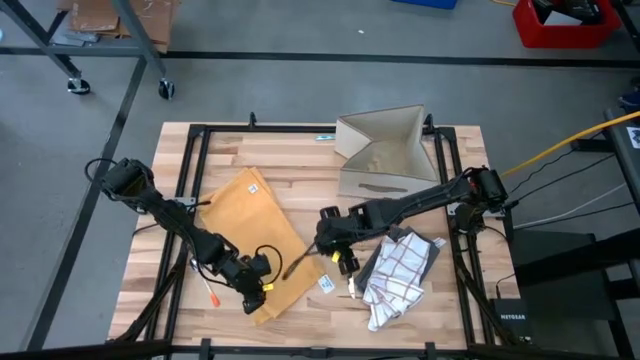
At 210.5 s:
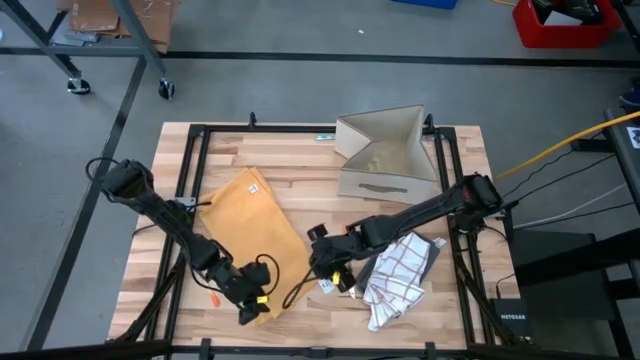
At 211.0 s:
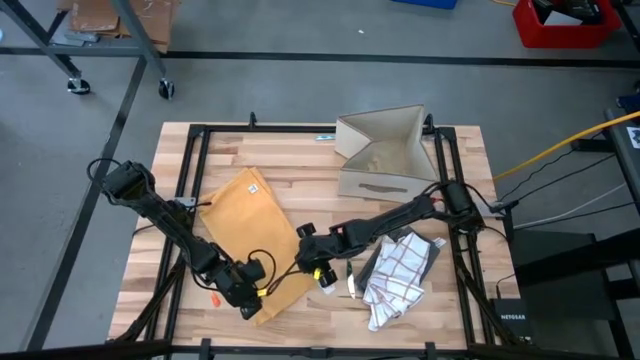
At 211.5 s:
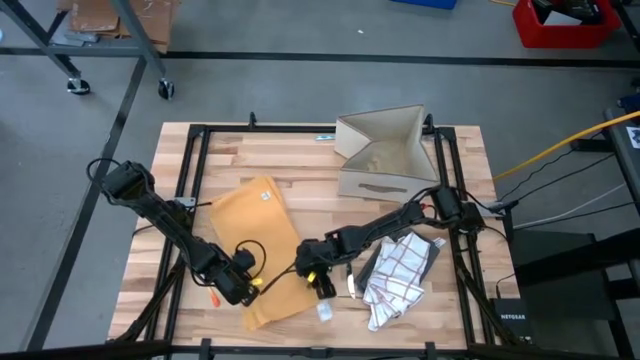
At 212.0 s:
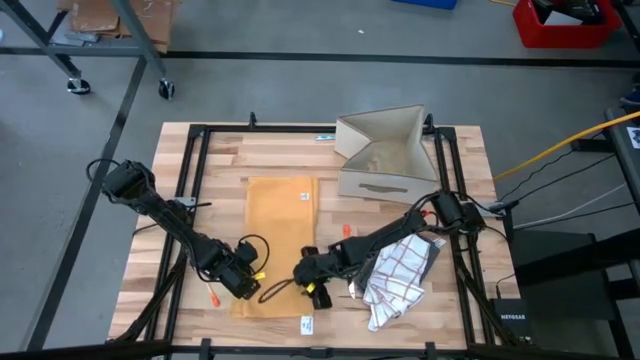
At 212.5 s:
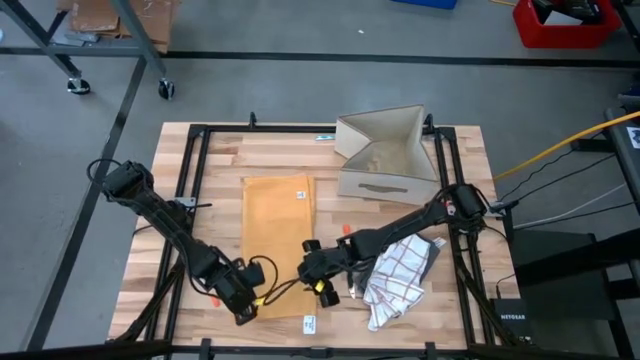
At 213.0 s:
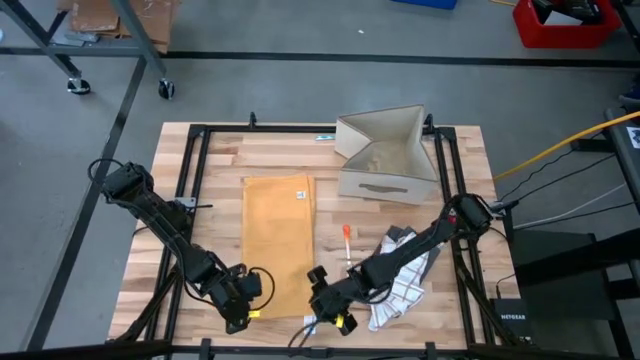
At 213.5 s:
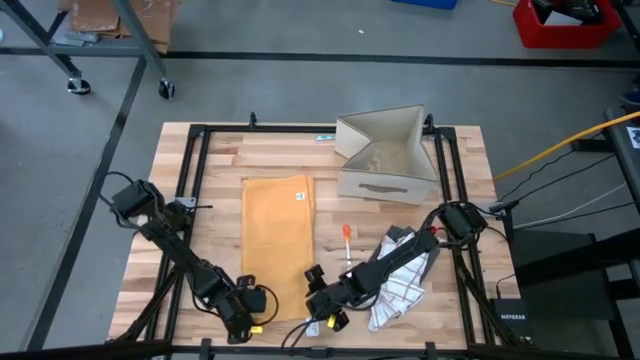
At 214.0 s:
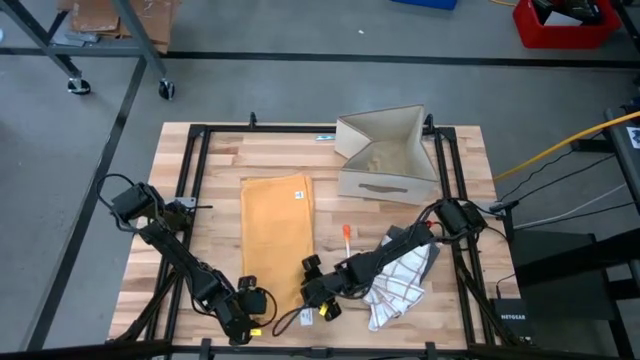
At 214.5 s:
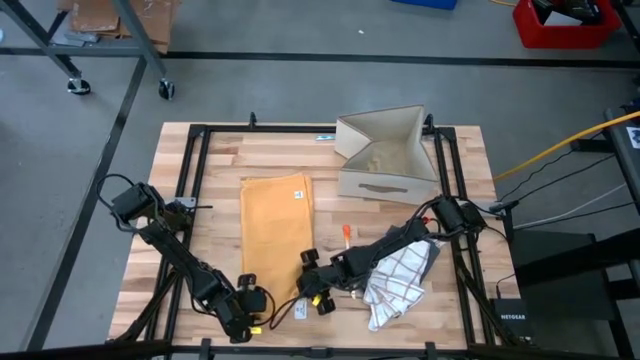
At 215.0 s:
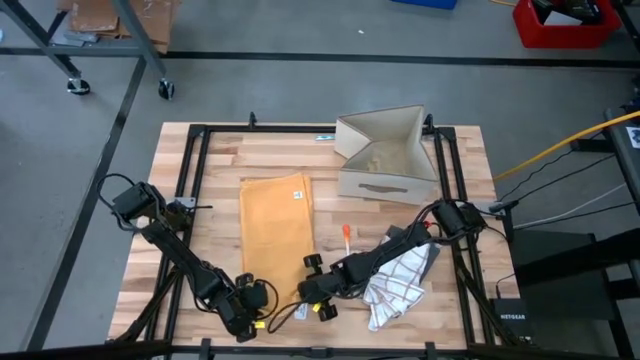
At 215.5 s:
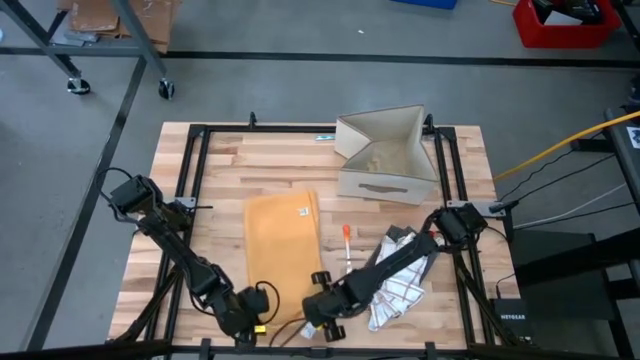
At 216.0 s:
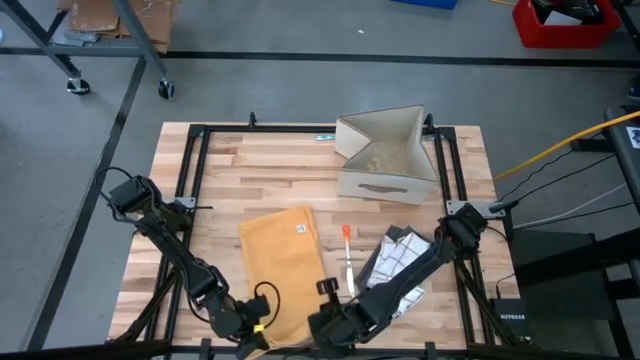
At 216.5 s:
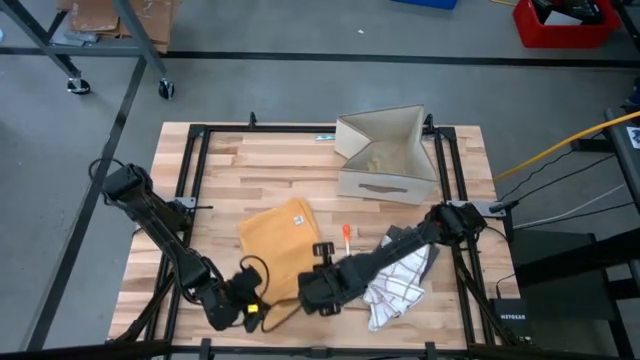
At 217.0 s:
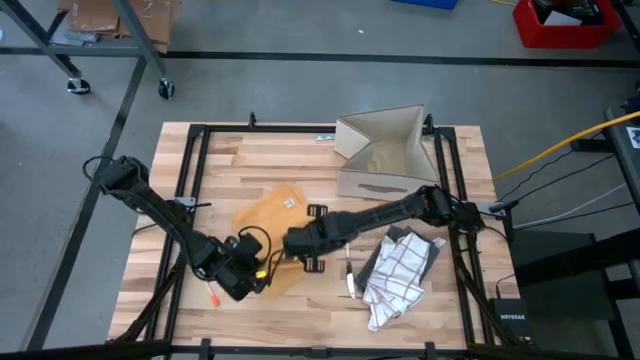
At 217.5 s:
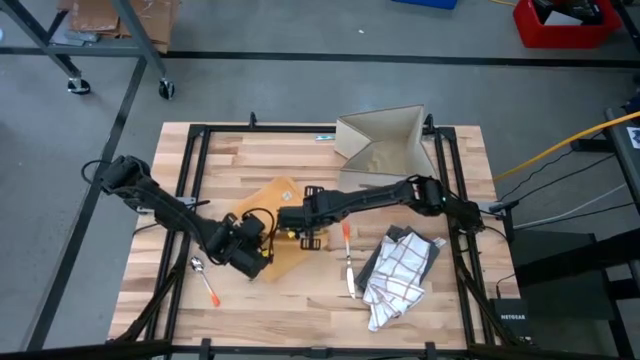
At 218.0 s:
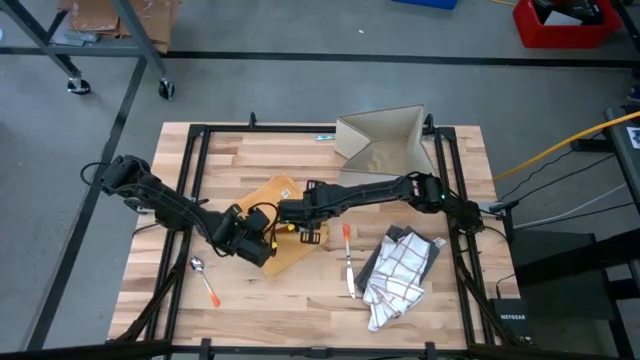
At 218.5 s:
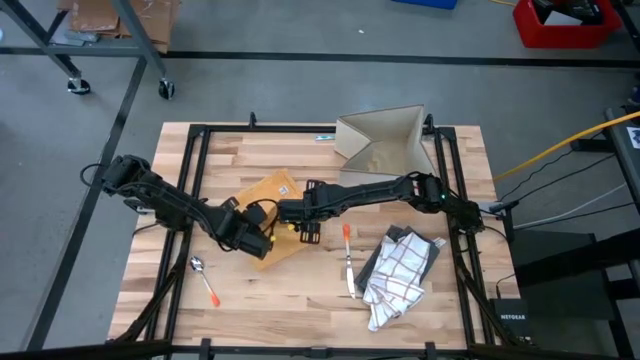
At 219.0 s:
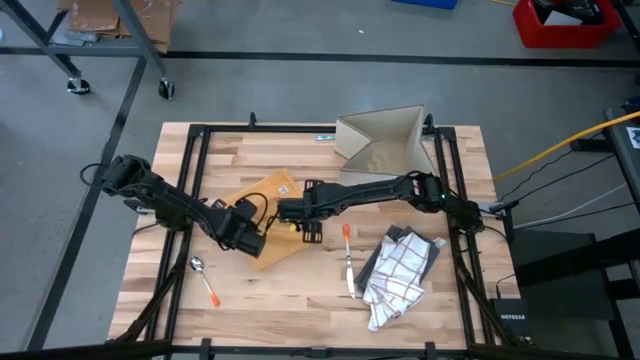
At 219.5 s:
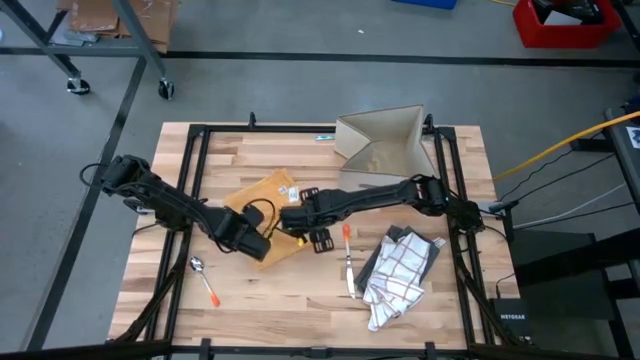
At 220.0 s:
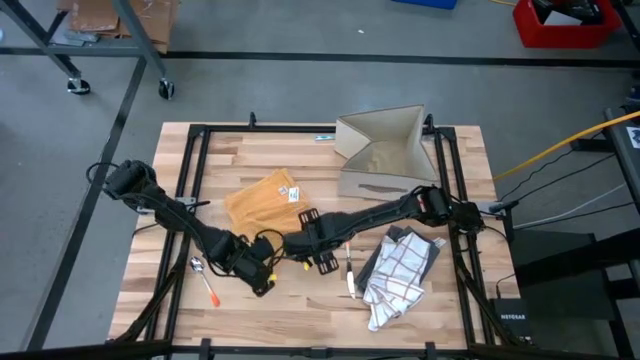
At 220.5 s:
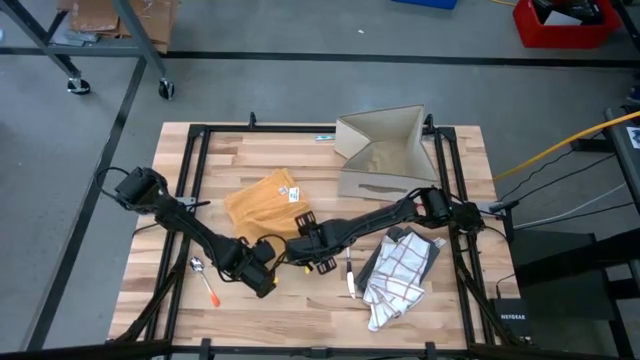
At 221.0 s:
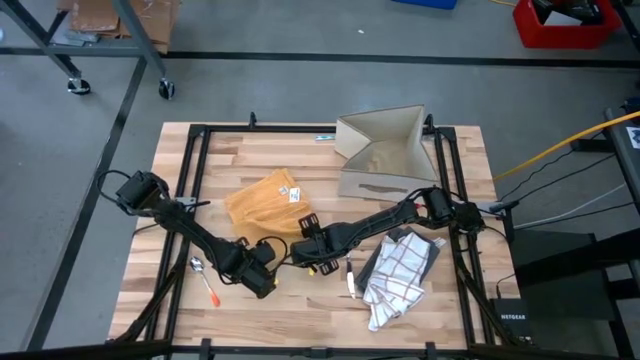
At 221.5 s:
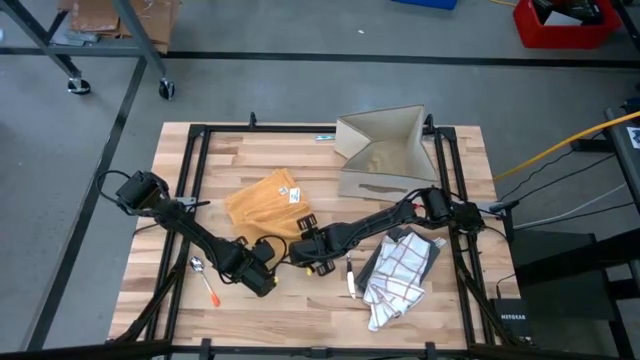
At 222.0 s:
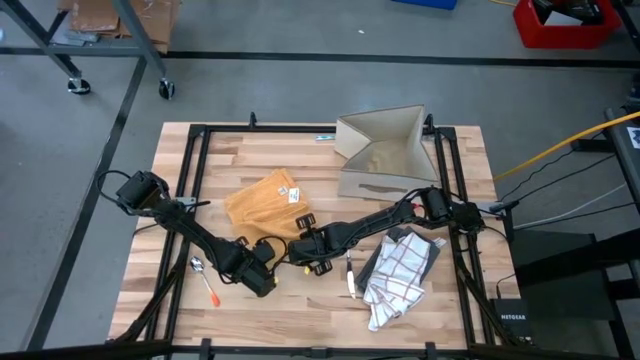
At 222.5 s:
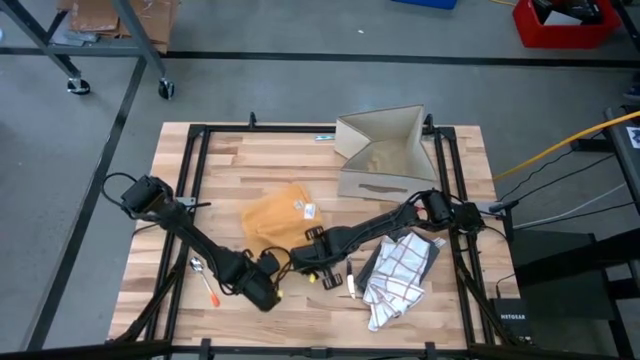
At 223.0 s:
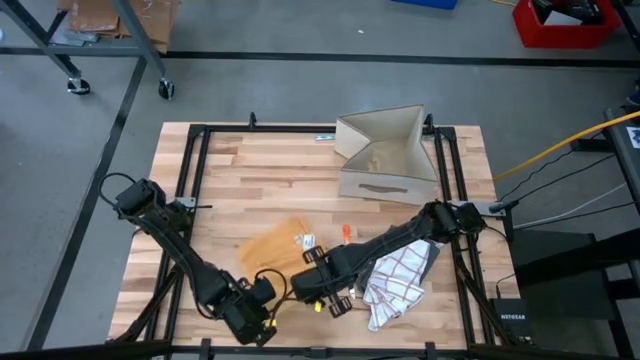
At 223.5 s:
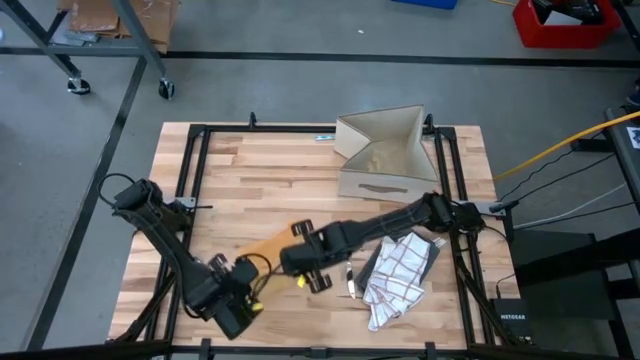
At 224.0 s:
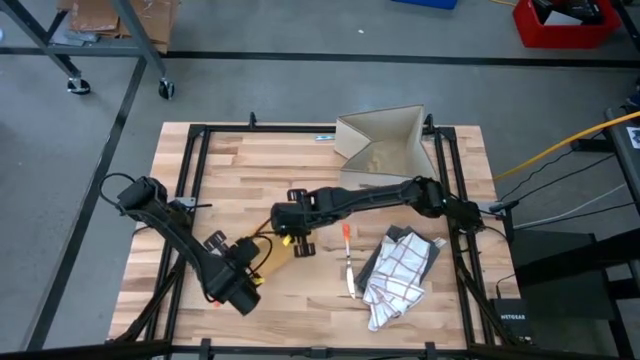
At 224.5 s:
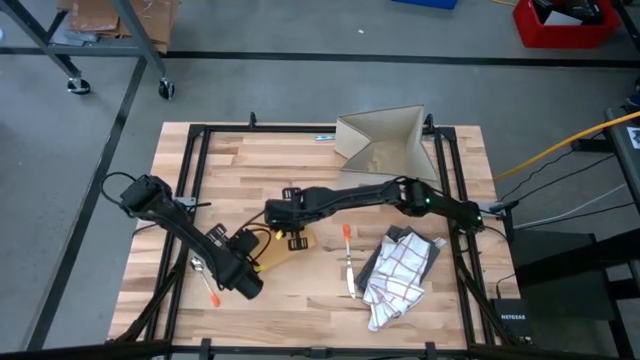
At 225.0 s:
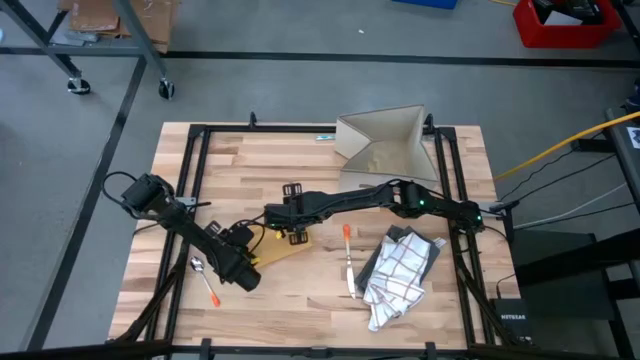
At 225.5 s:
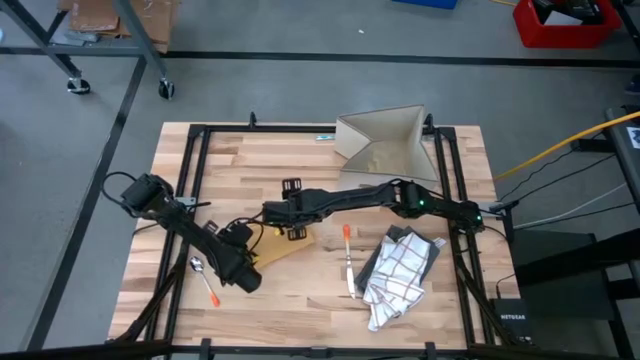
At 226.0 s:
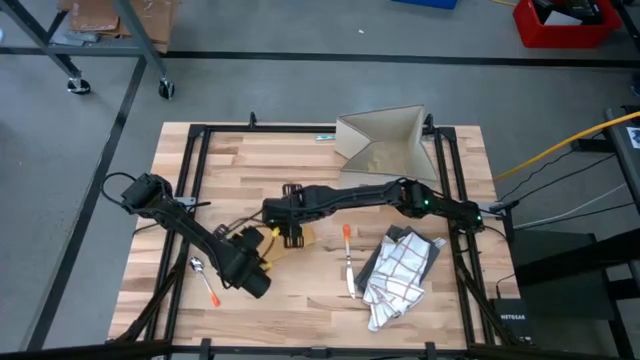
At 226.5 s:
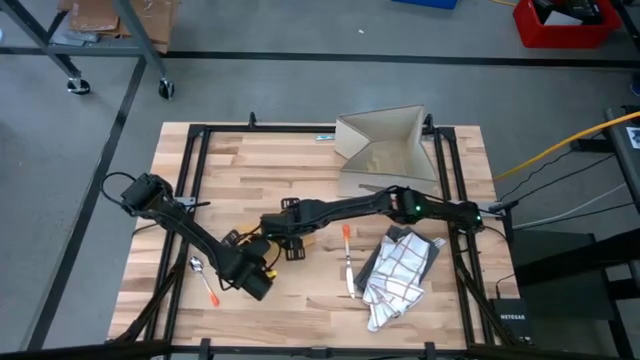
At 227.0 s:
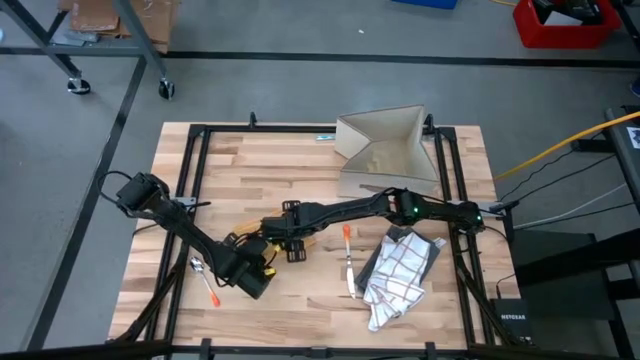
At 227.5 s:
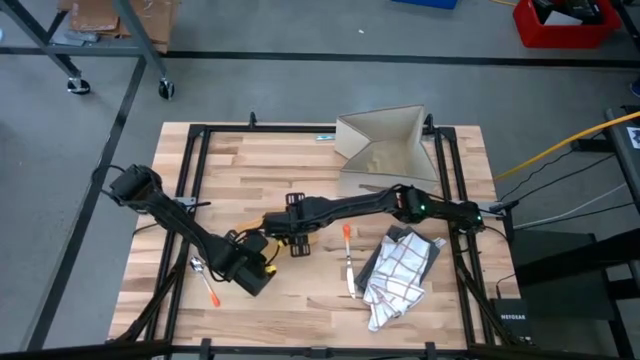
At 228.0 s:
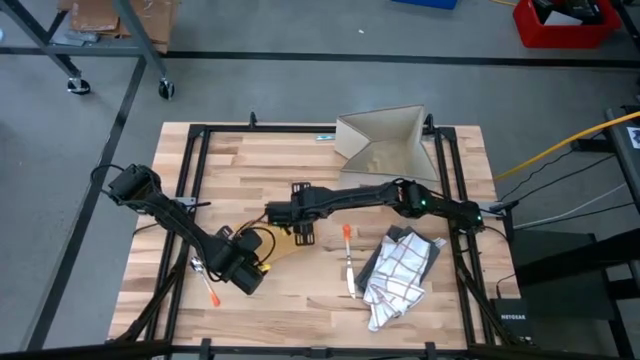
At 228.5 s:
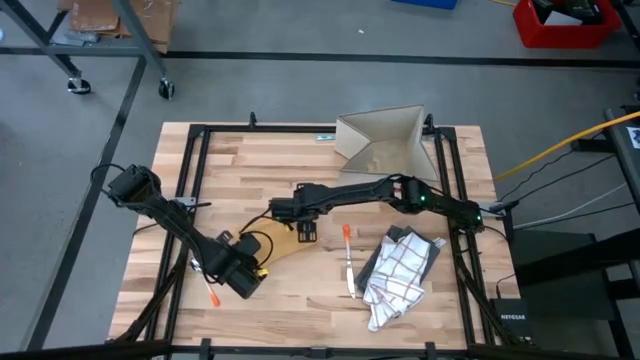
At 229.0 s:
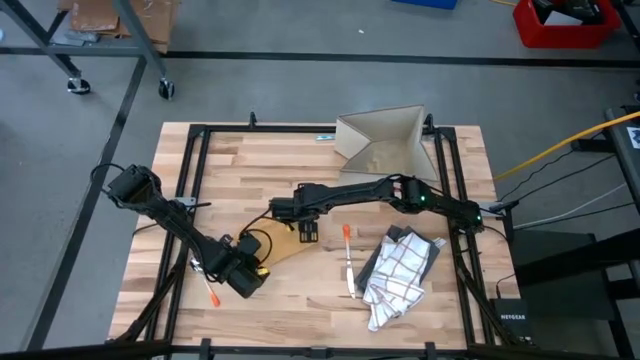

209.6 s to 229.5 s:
Task: Fold towel
Fold the orange kitchen towel
